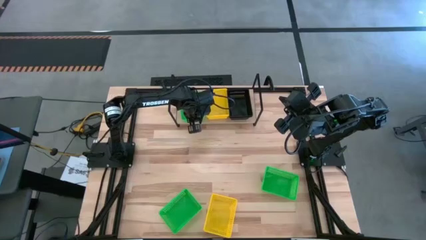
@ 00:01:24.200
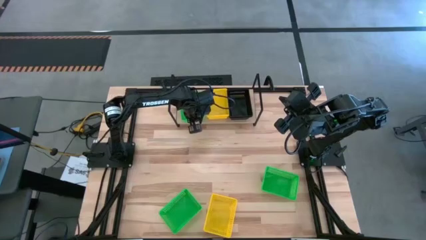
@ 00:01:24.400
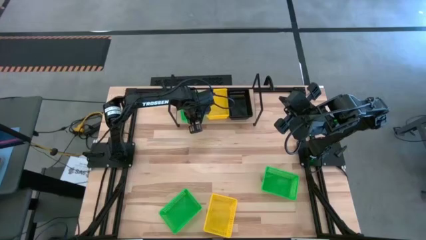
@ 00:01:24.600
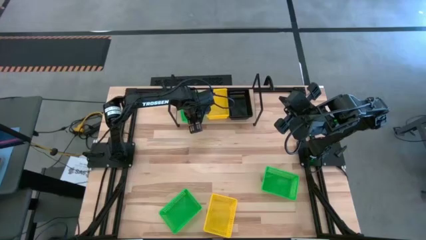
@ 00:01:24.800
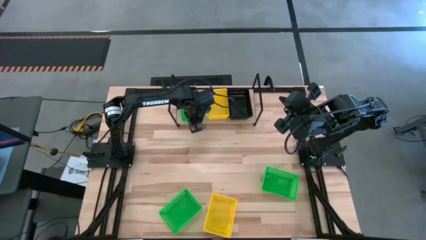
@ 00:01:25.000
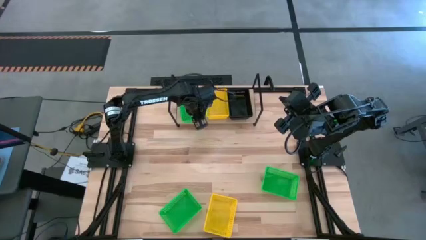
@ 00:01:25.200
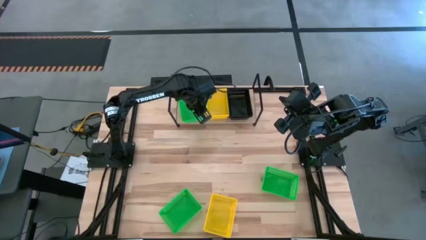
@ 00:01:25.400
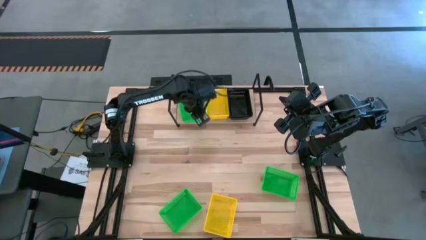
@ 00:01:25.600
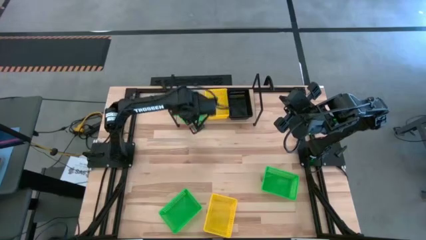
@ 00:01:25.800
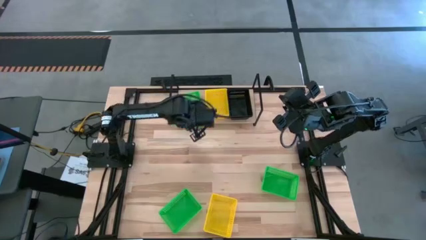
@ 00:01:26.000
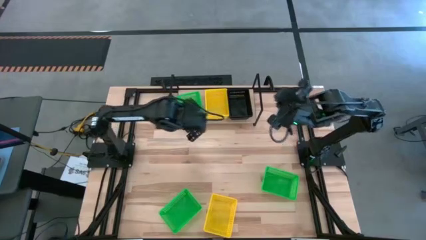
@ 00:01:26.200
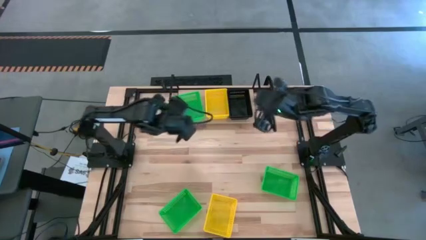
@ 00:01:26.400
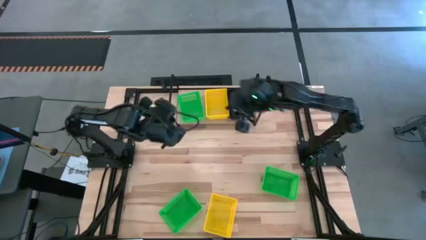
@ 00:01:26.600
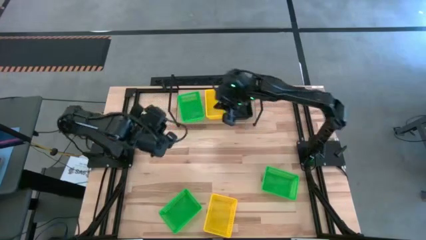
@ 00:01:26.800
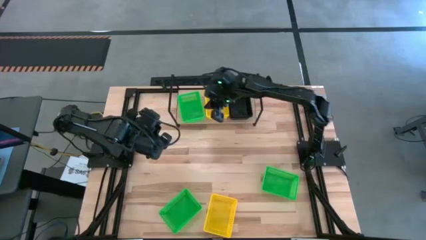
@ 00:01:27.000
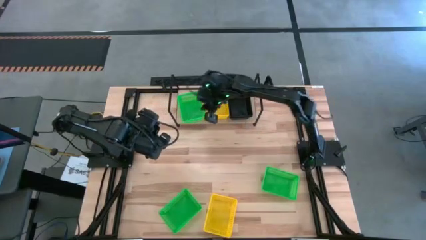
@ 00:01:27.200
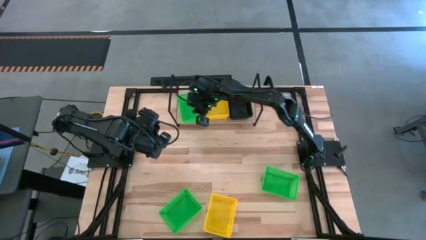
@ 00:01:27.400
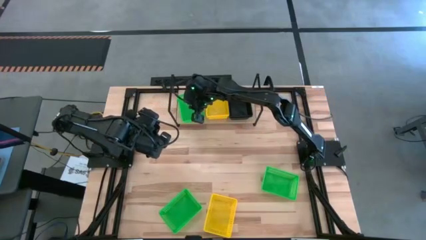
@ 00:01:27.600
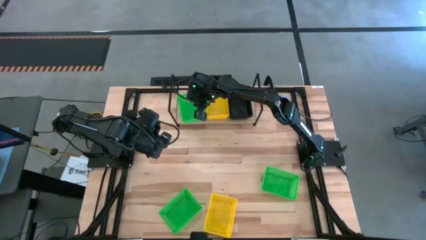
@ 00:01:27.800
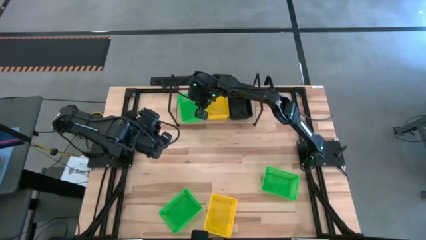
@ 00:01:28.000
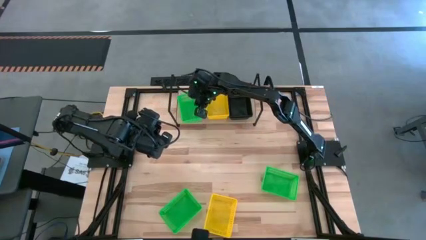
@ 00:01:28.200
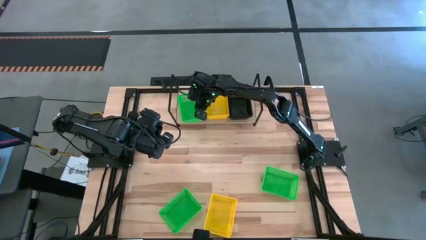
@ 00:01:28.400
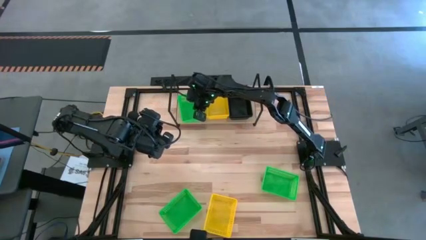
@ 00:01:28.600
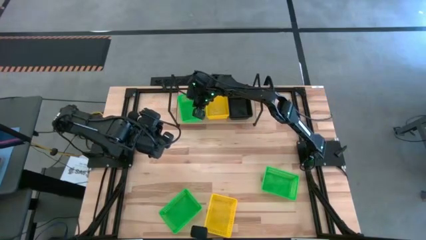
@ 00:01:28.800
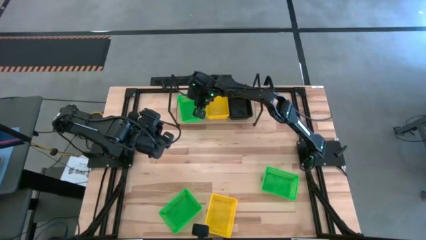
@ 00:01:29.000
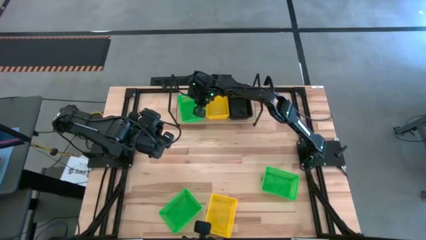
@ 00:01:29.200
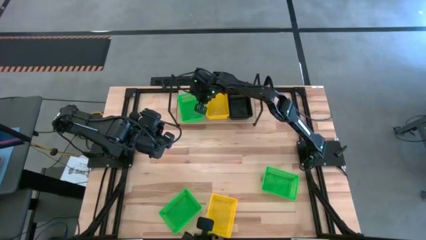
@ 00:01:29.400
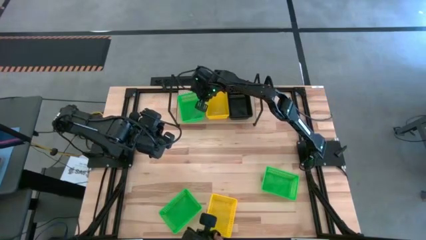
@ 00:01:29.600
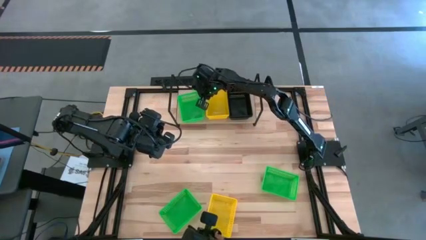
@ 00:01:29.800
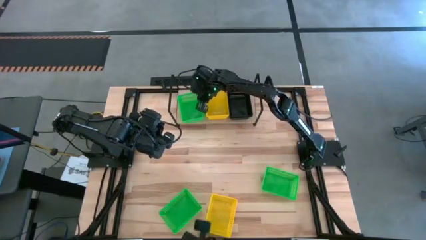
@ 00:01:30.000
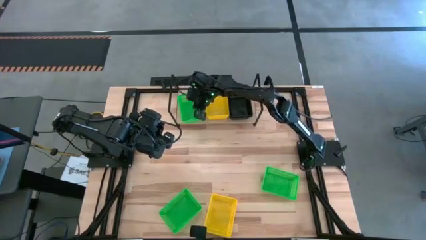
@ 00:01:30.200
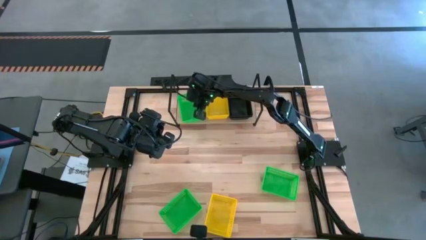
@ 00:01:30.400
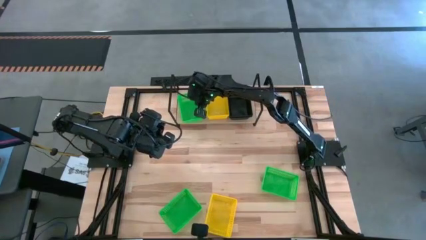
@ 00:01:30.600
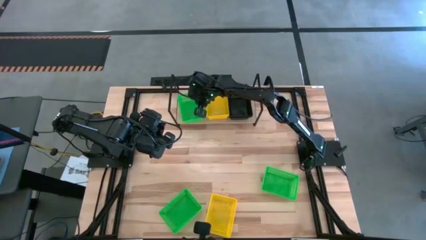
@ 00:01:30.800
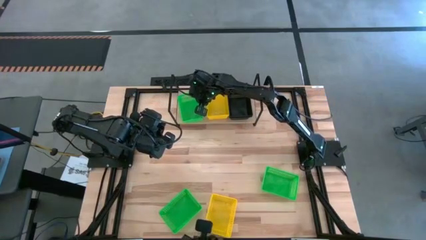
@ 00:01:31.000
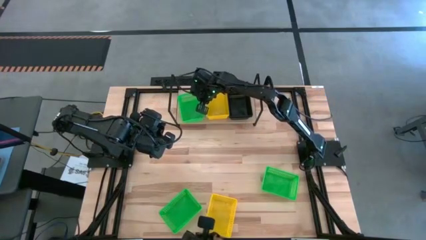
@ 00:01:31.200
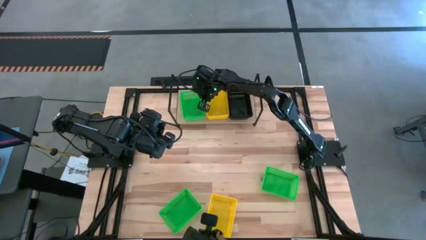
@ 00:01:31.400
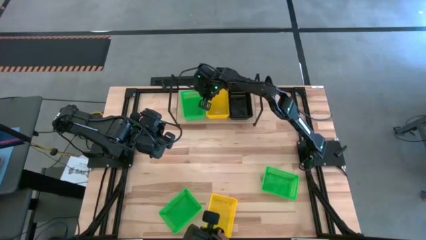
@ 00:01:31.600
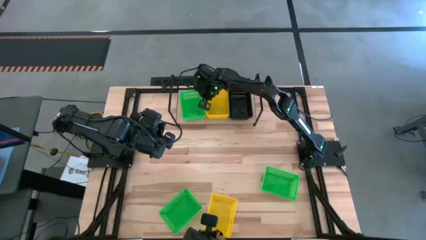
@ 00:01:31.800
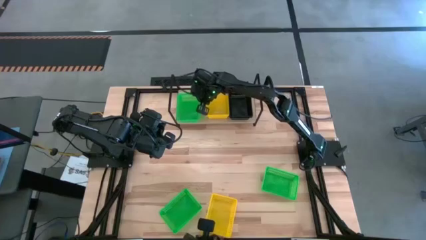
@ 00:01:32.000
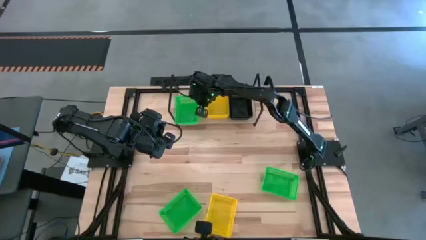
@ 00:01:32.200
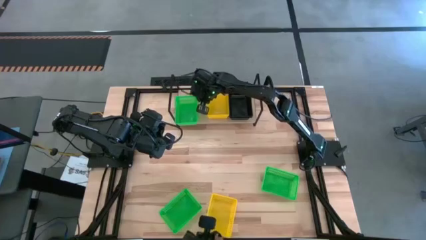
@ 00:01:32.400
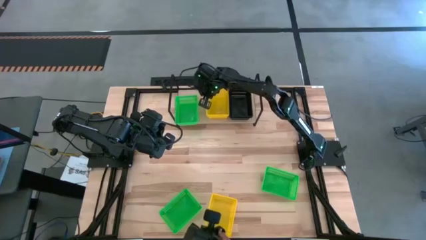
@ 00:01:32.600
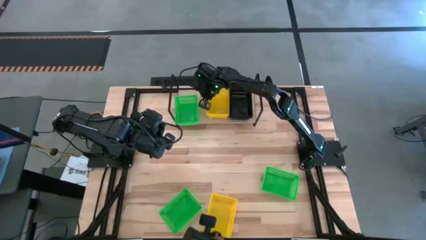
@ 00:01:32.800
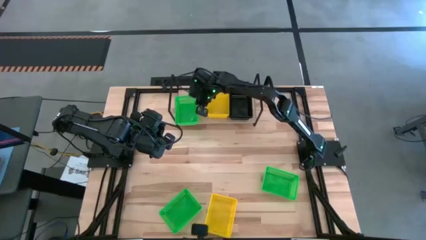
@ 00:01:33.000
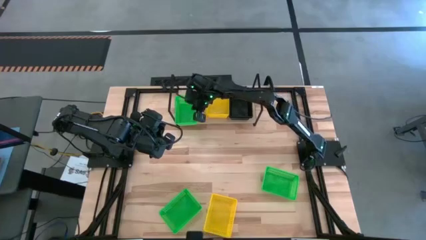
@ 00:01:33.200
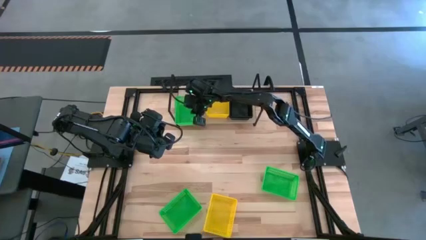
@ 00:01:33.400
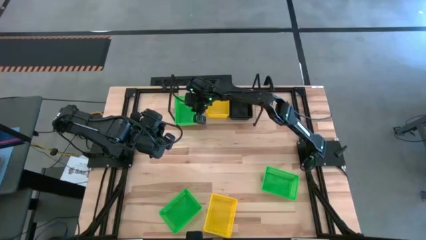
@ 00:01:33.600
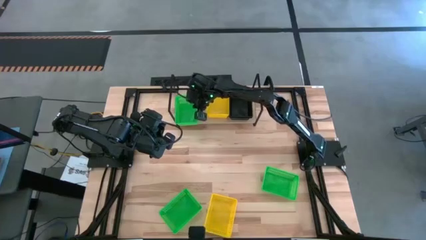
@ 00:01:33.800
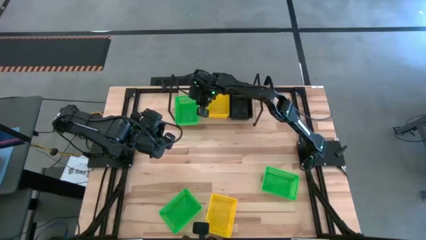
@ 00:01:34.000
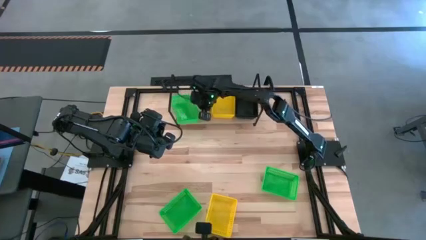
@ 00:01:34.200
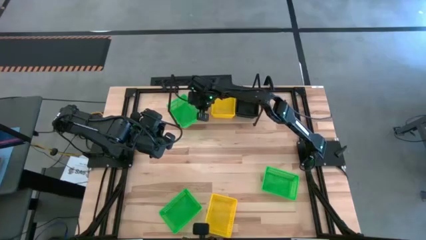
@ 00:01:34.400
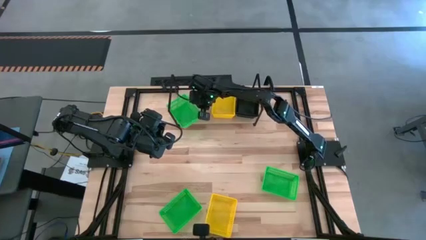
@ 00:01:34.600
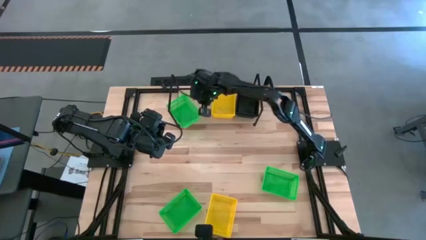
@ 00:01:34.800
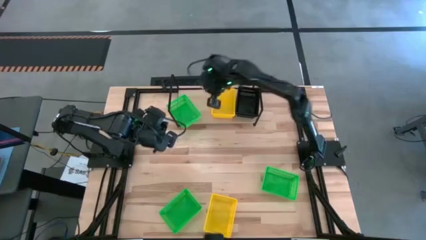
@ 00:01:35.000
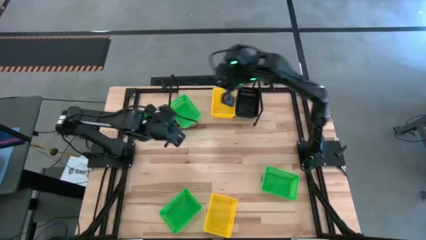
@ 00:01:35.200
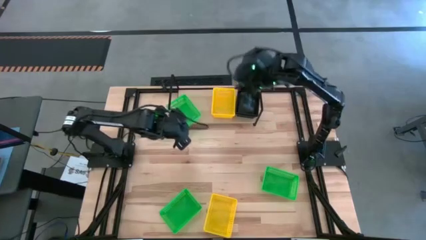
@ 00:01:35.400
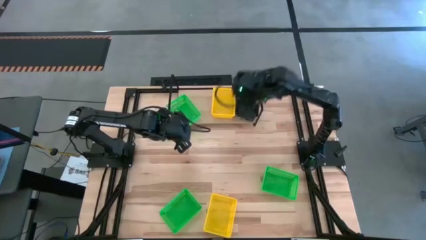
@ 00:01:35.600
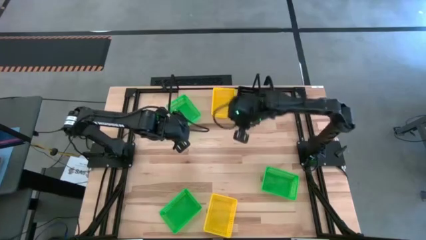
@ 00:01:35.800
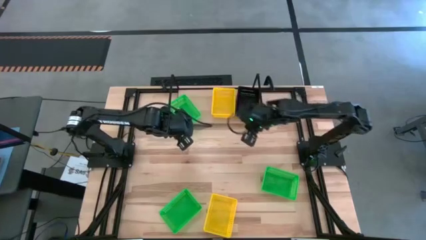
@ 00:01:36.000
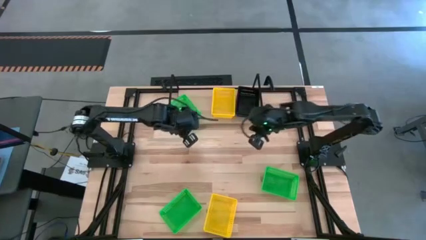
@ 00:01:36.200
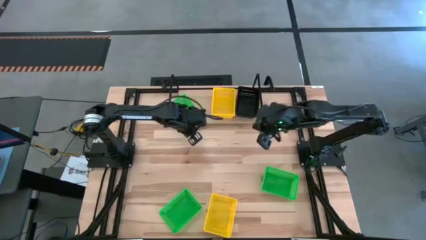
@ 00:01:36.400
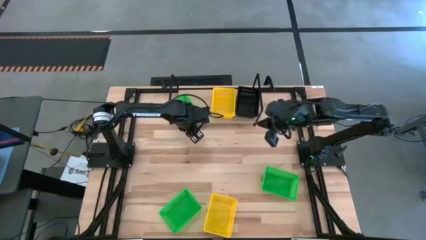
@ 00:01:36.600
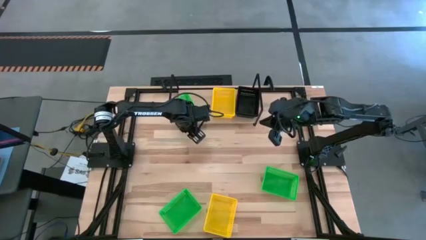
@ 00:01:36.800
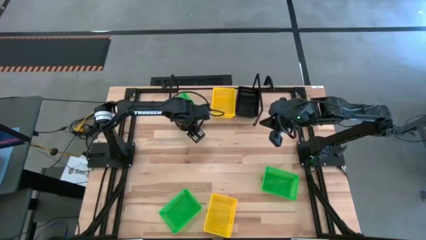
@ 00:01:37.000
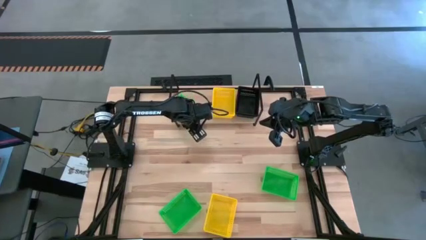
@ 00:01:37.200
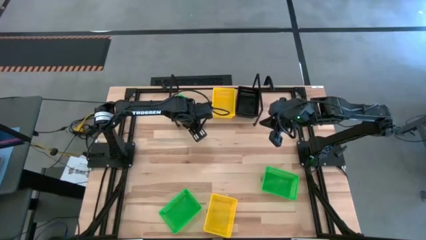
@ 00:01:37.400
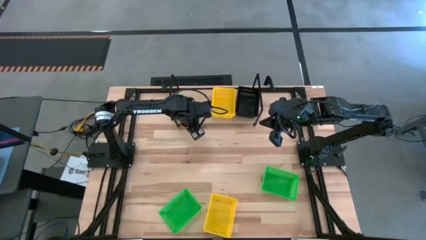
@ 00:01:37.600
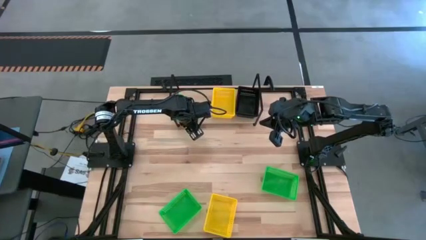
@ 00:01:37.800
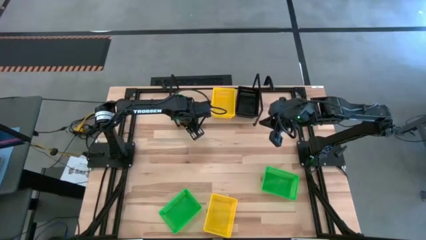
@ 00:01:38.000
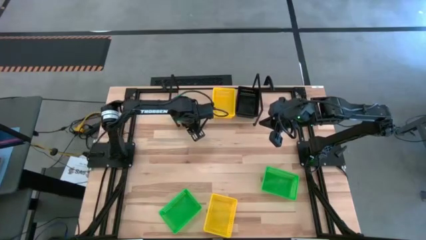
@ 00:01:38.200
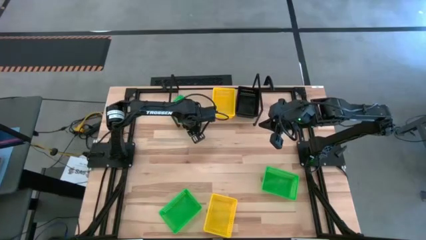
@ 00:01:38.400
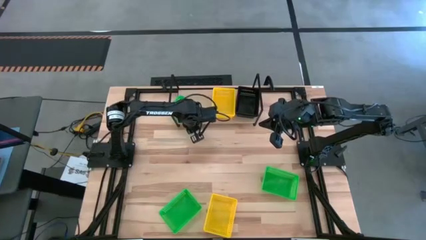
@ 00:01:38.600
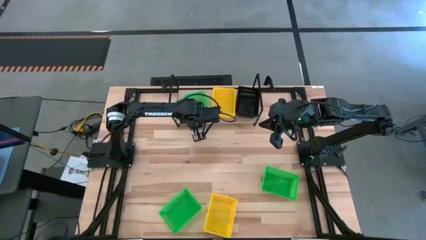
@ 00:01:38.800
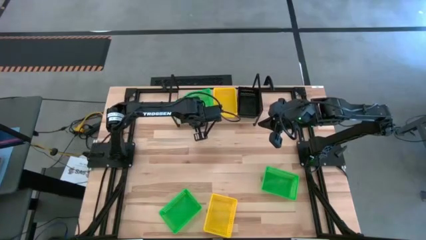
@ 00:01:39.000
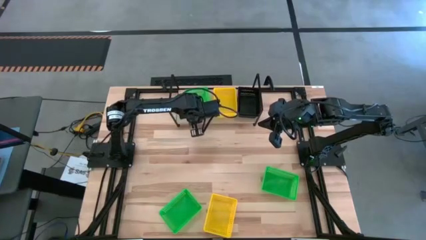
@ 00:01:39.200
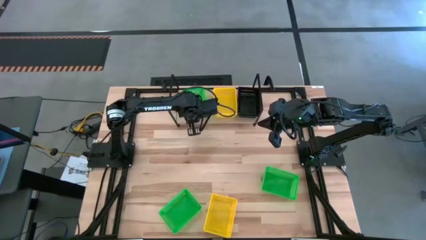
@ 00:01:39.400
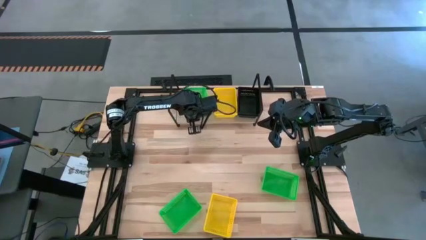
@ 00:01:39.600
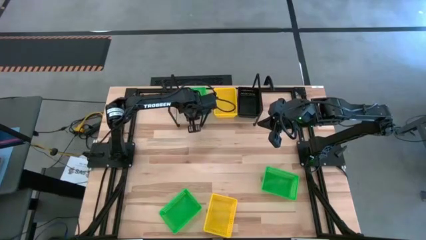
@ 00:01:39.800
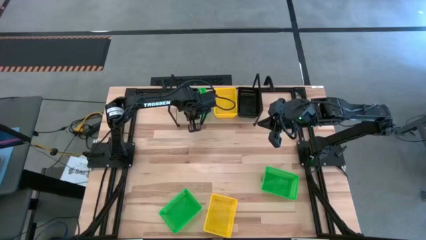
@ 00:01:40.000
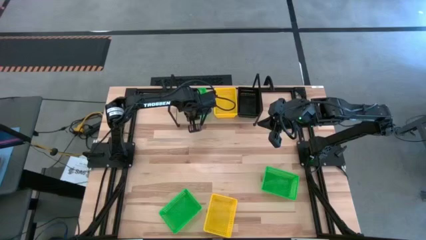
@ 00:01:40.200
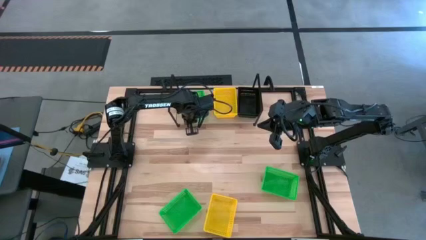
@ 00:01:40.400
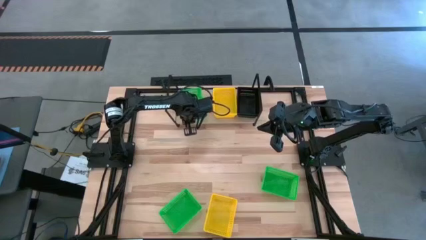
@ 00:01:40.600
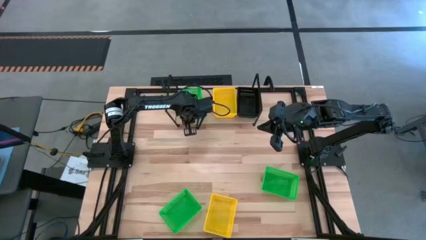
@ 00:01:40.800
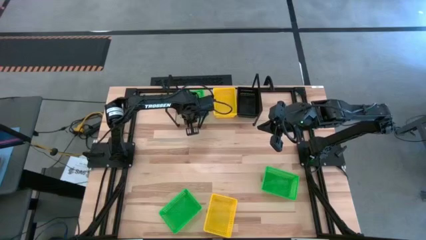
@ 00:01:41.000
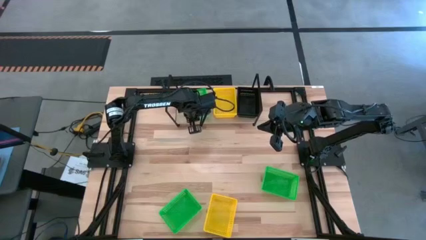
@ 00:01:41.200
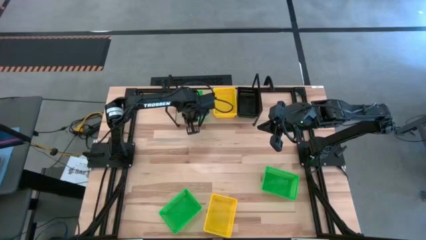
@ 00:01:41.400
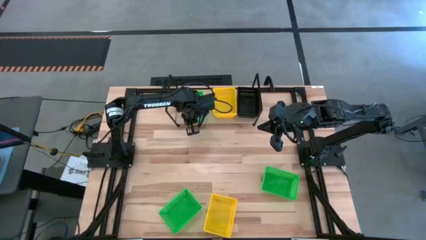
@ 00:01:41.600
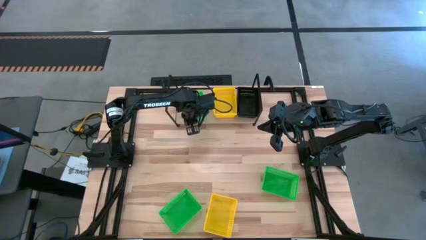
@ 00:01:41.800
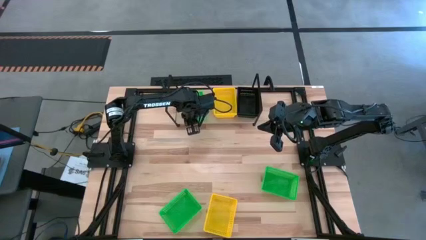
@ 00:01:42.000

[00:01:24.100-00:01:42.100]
Task: Stack baskets on shelf by color
Put the top left green bin on the shelf
